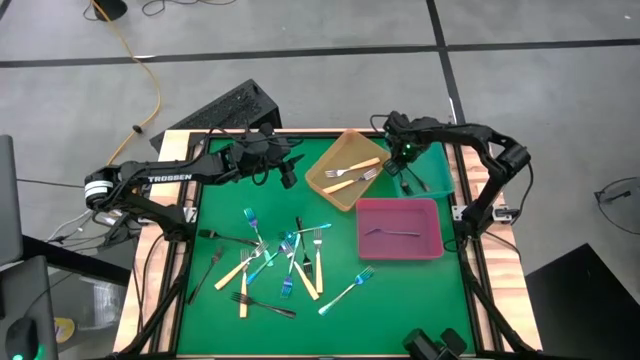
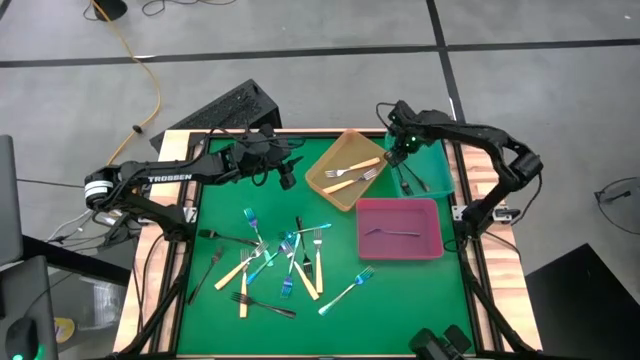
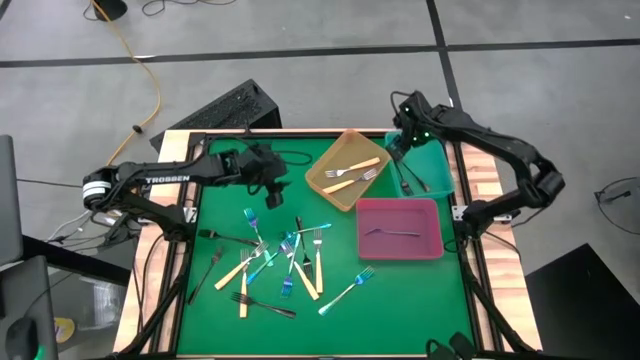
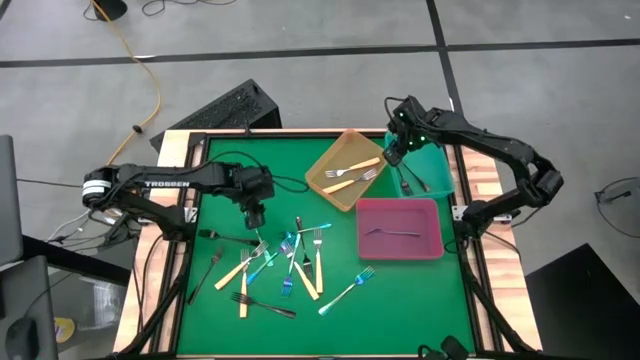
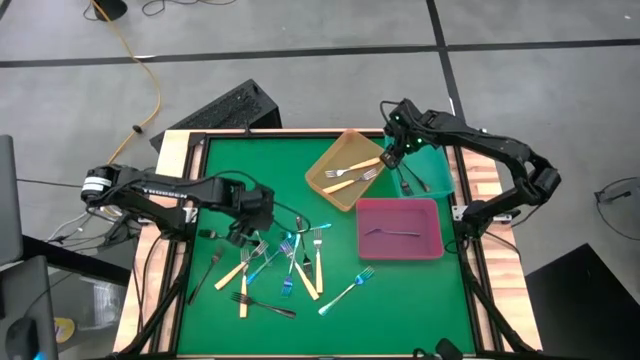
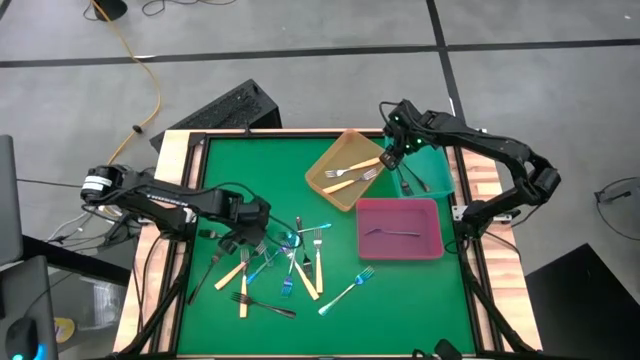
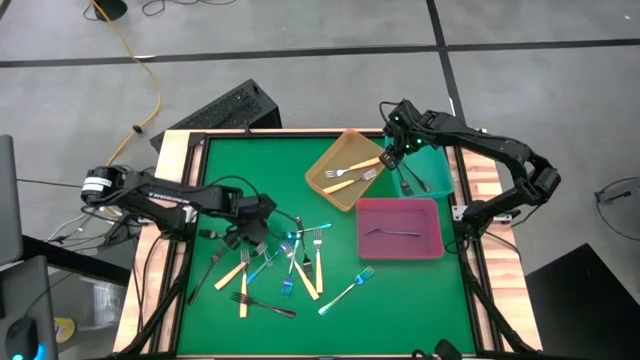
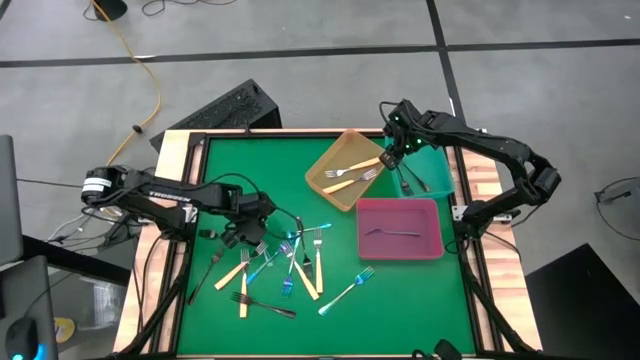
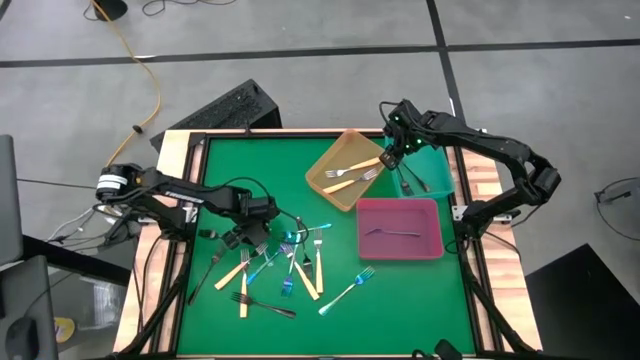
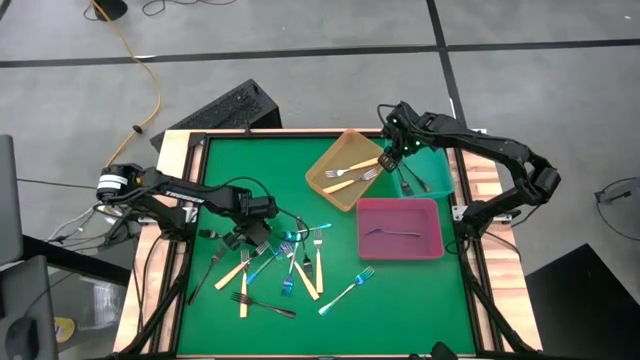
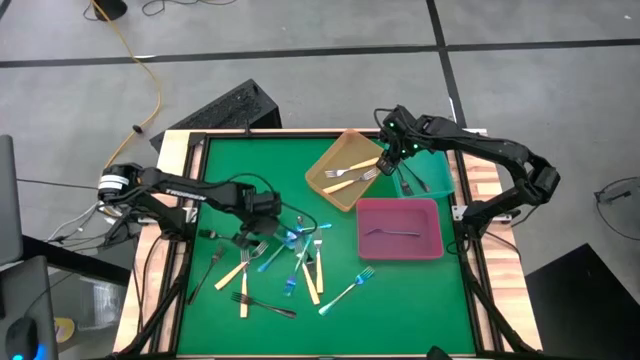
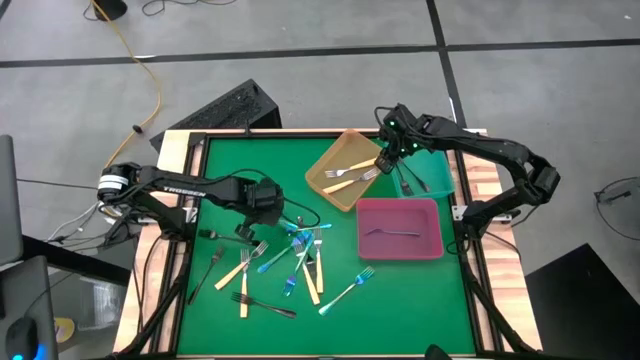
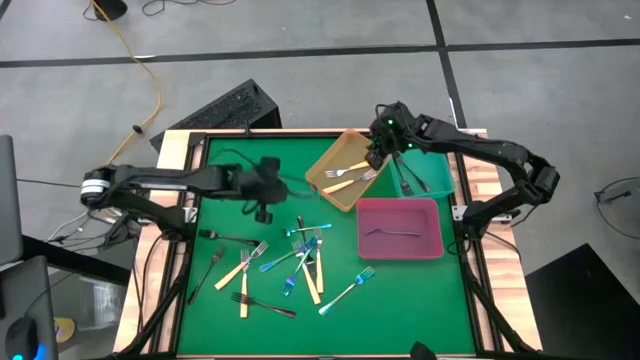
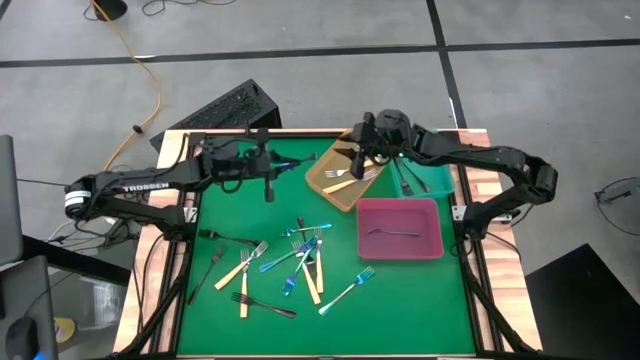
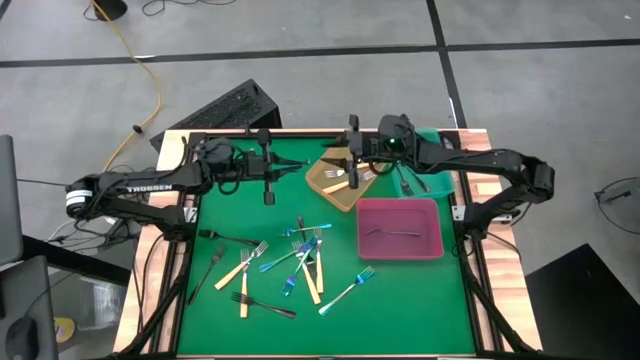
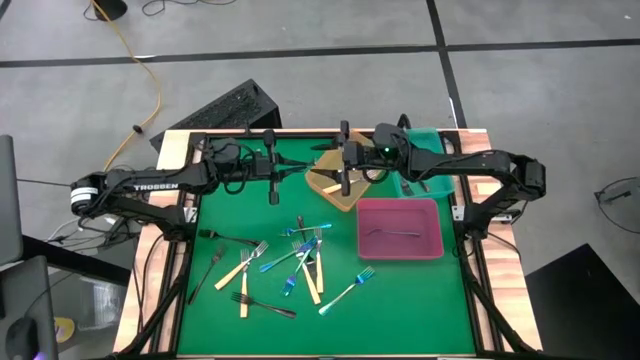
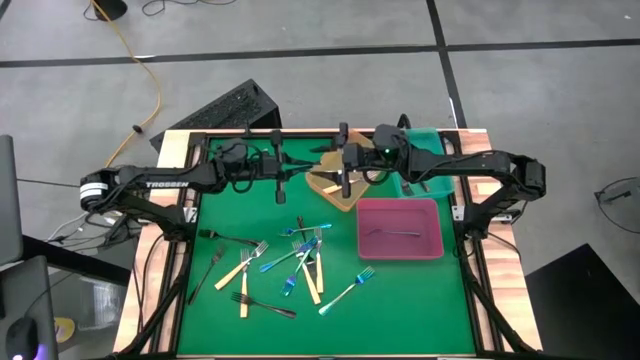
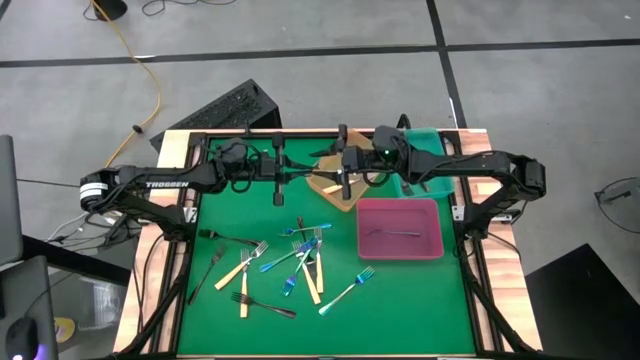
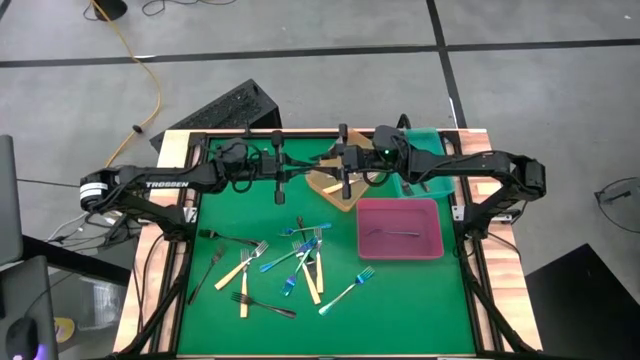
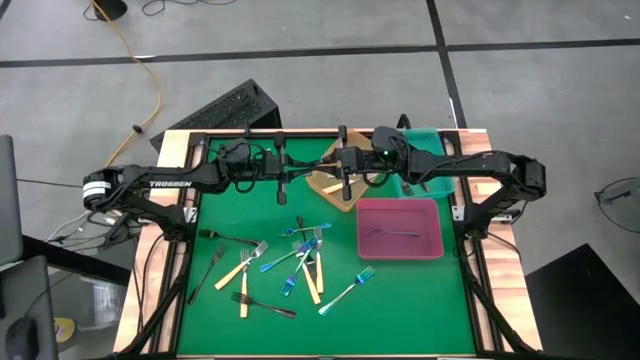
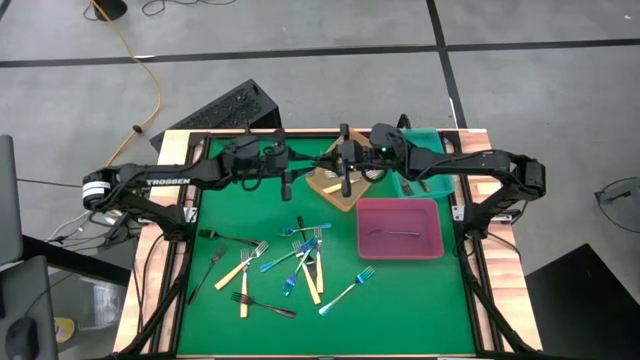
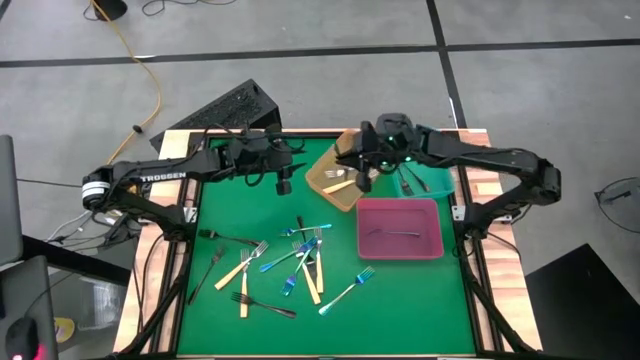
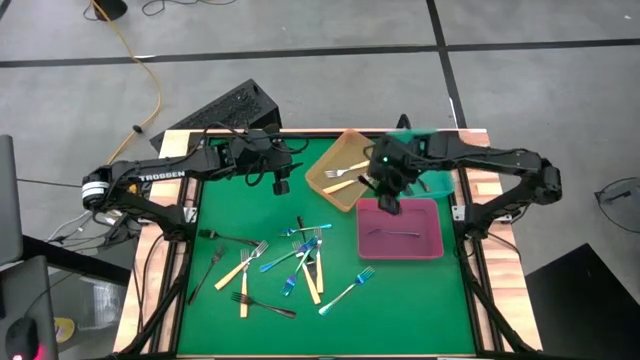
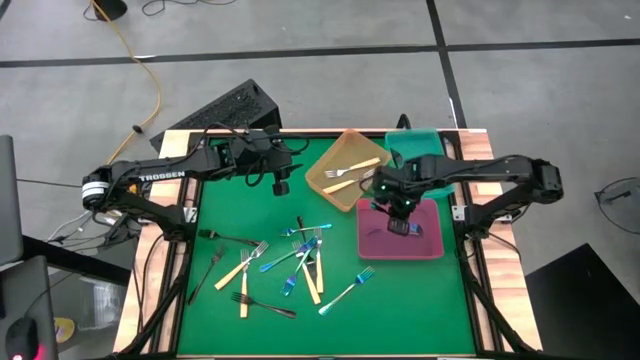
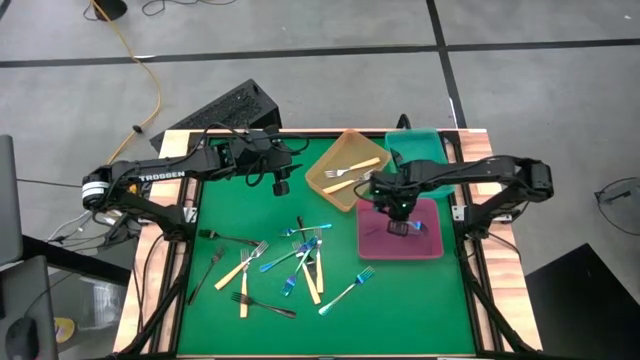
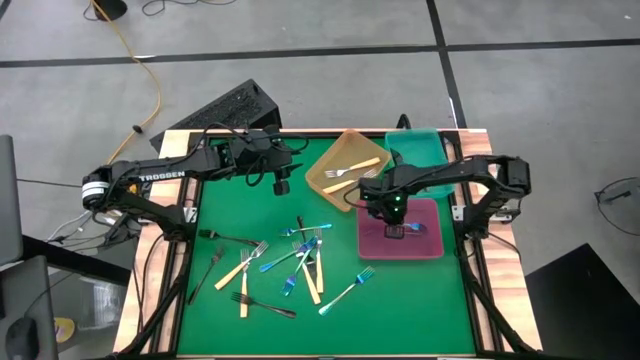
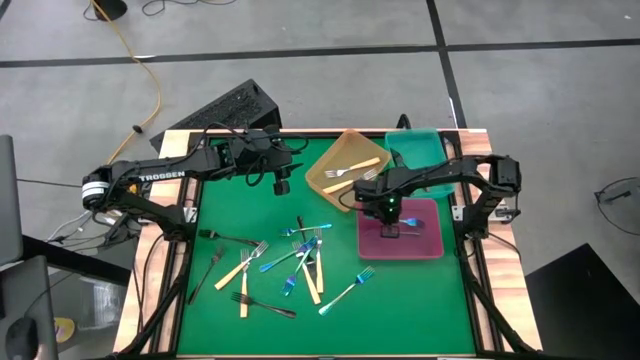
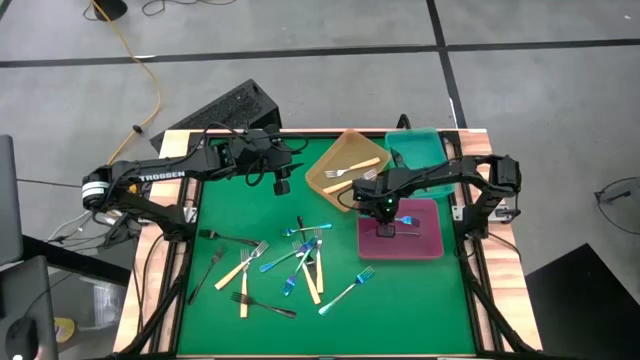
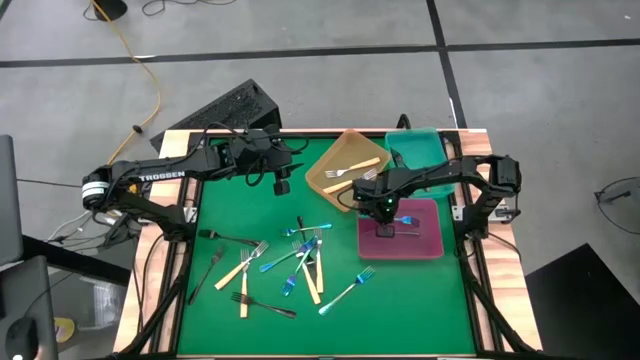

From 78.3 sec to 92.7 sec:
Task: Sort silverware by color (type)
Put the blue fork into the pink bin

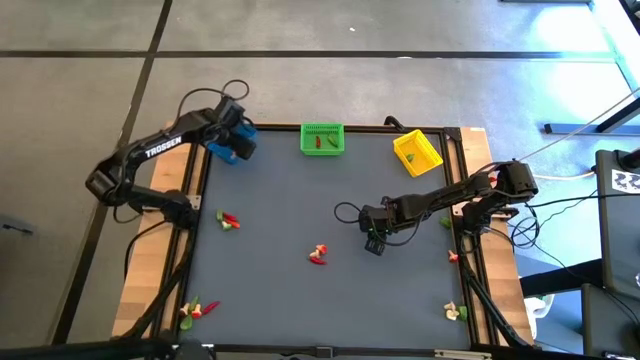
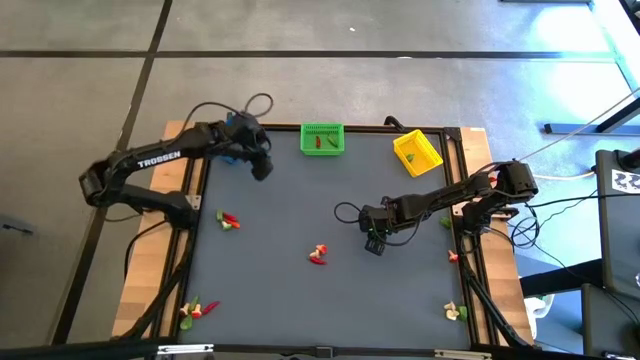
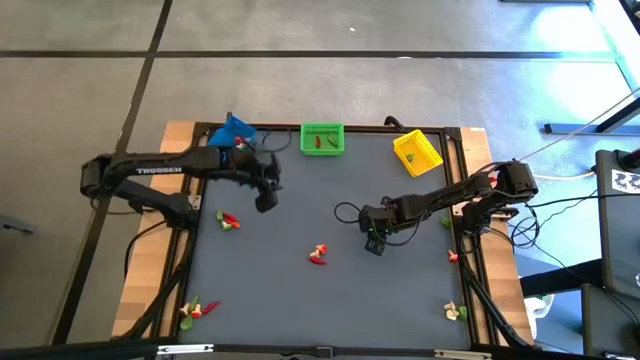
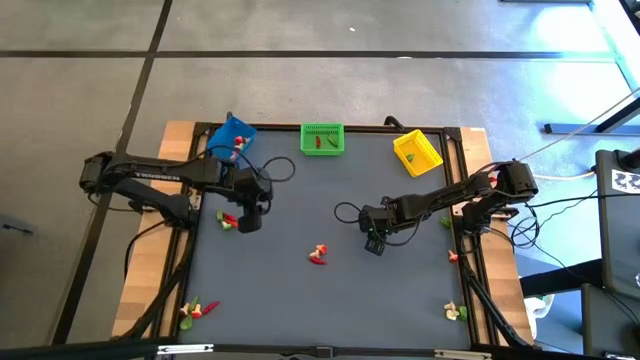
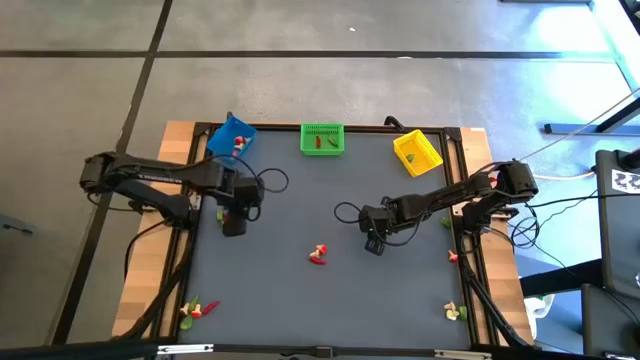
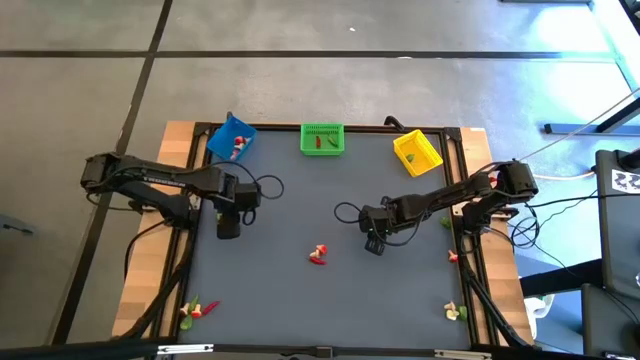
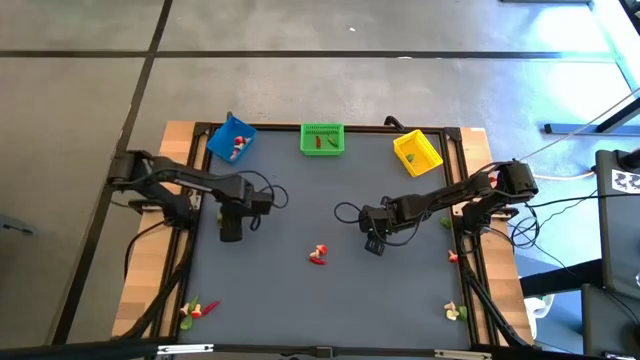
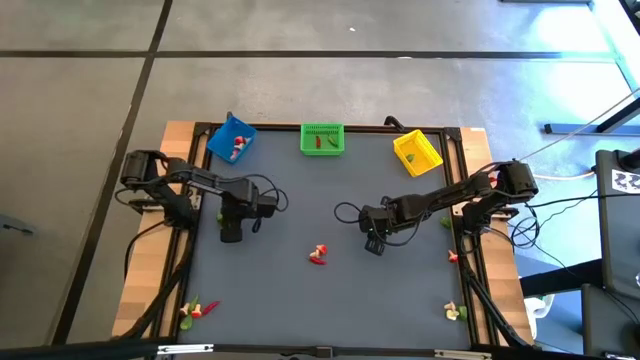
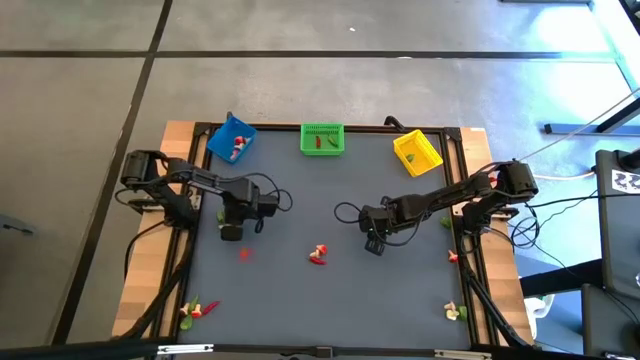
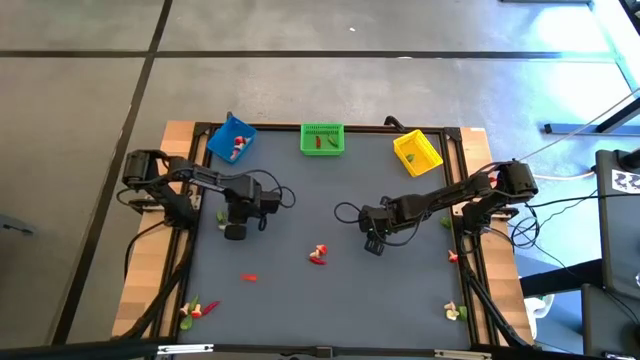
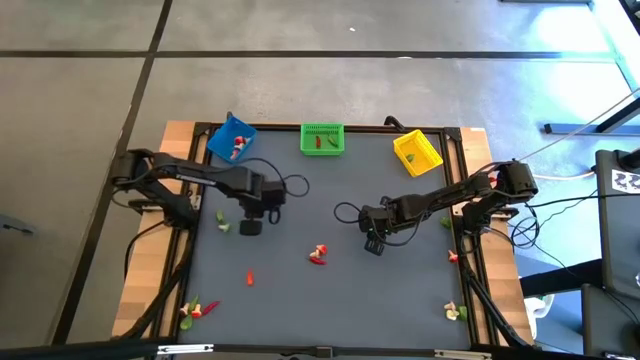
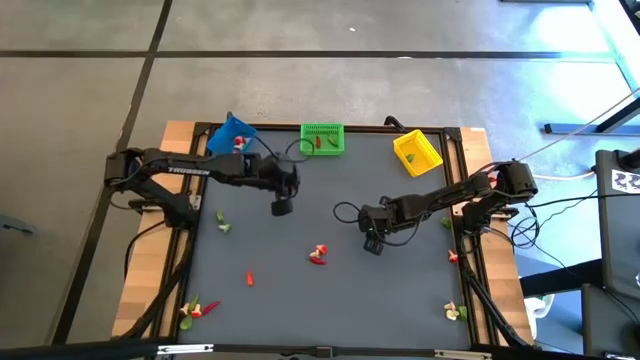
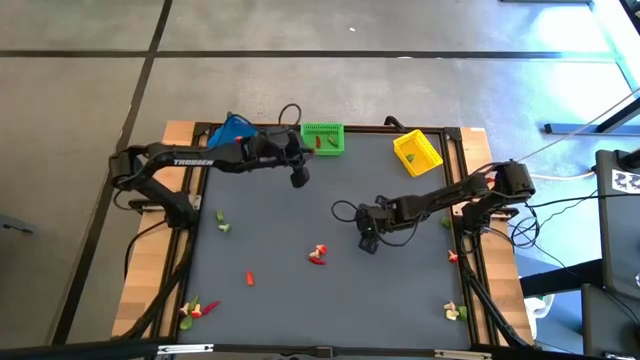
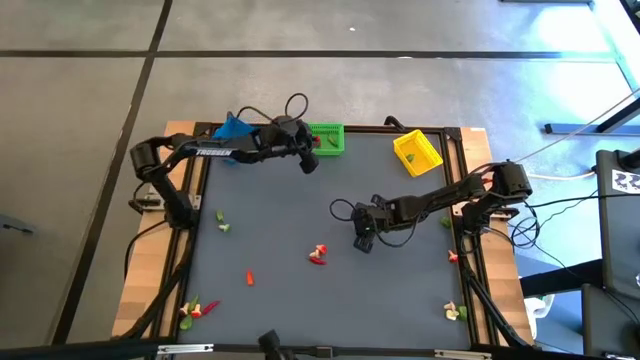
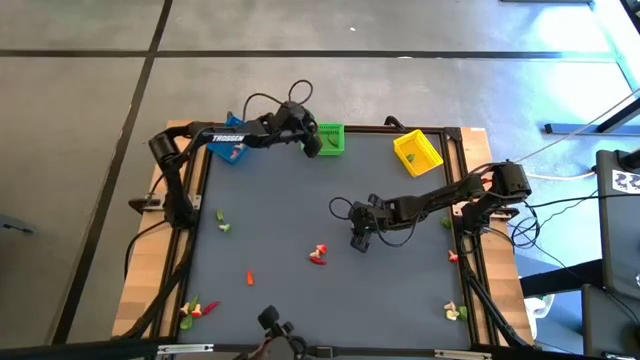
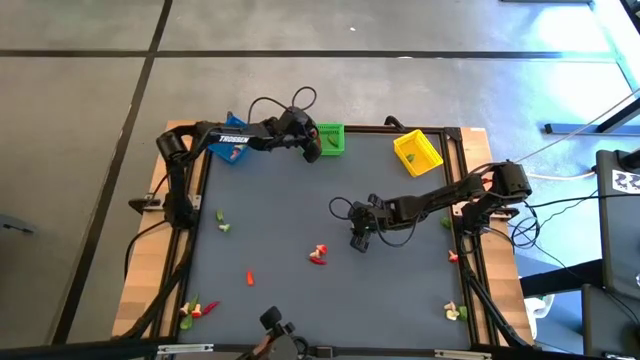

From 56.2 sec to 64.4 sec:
Task: Sort produce into baskets
Put the red chili pepper into the green bin
